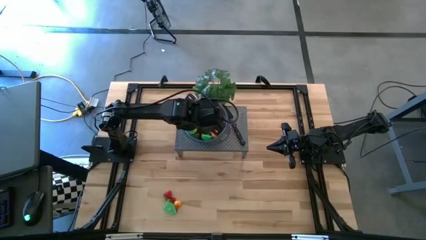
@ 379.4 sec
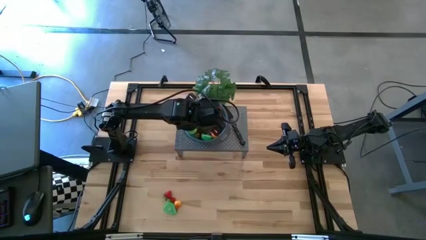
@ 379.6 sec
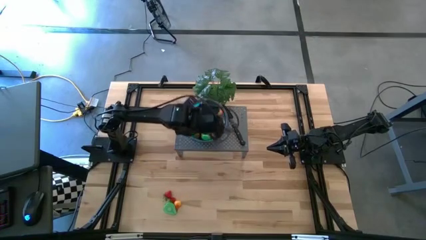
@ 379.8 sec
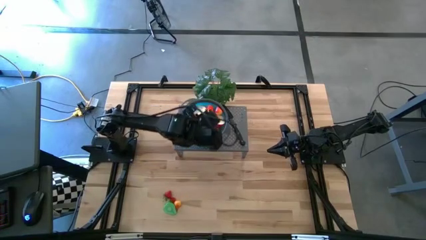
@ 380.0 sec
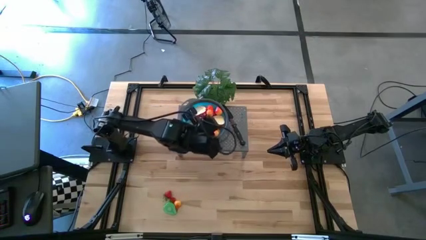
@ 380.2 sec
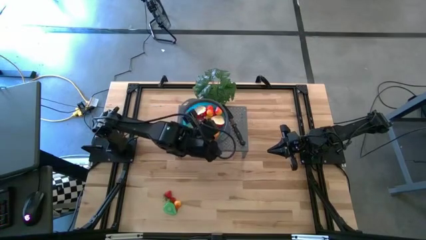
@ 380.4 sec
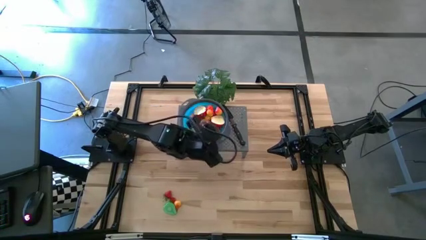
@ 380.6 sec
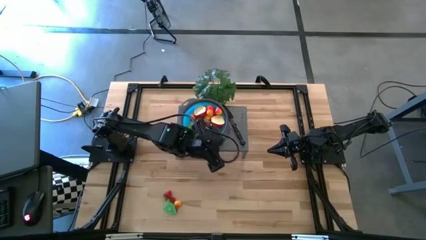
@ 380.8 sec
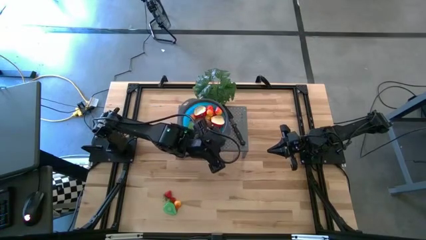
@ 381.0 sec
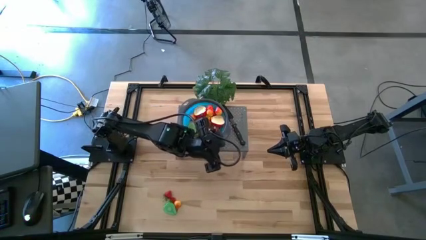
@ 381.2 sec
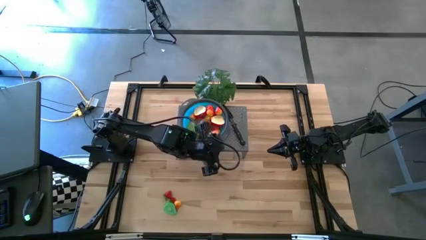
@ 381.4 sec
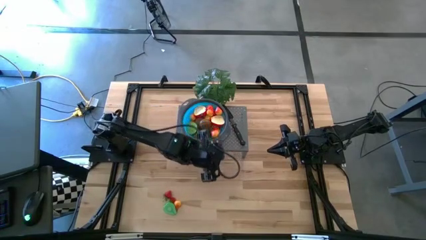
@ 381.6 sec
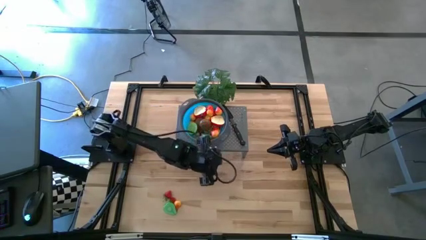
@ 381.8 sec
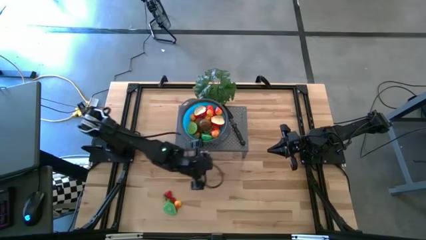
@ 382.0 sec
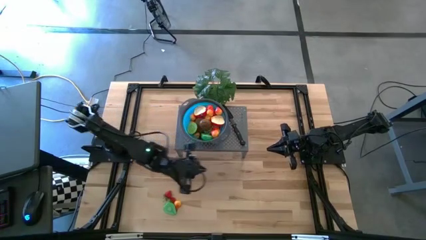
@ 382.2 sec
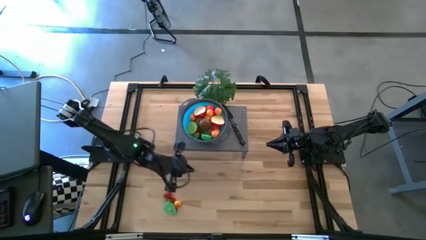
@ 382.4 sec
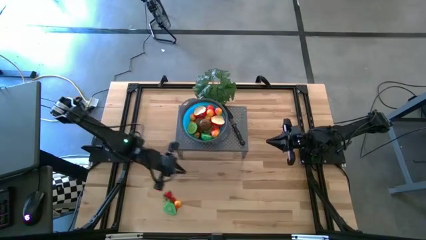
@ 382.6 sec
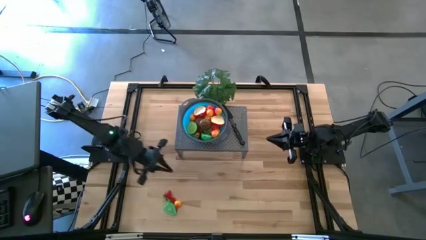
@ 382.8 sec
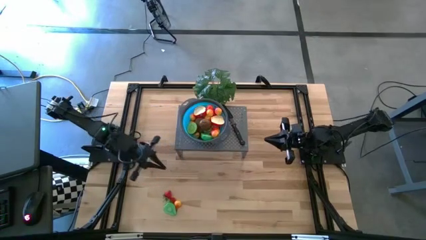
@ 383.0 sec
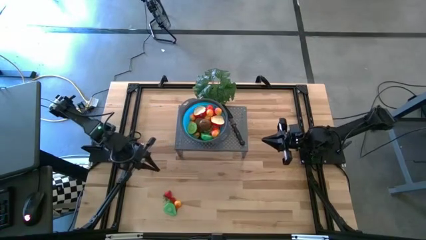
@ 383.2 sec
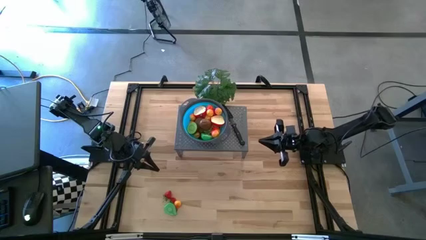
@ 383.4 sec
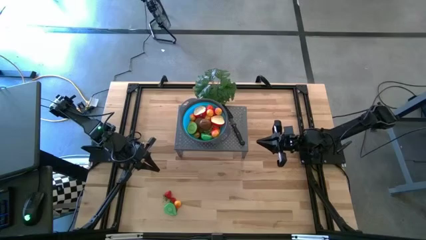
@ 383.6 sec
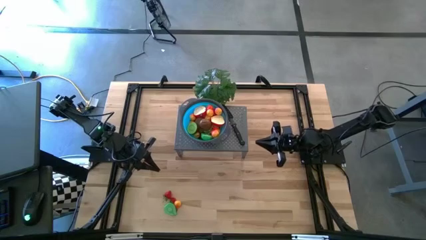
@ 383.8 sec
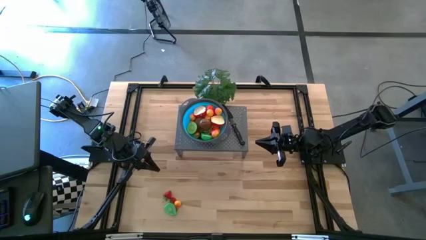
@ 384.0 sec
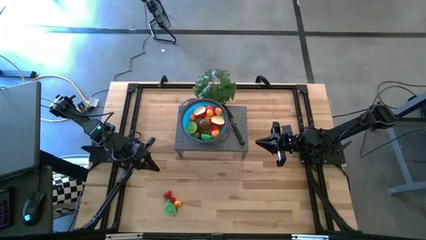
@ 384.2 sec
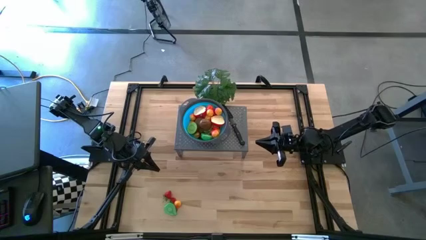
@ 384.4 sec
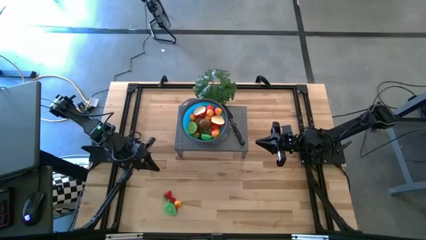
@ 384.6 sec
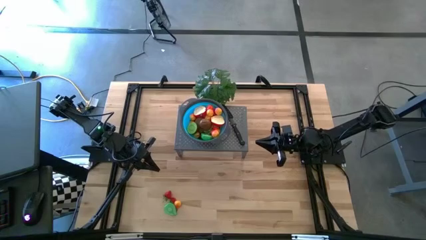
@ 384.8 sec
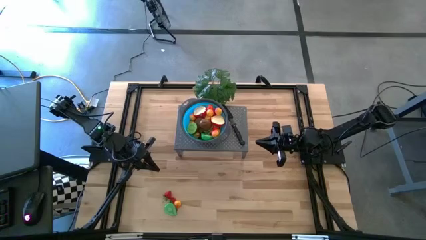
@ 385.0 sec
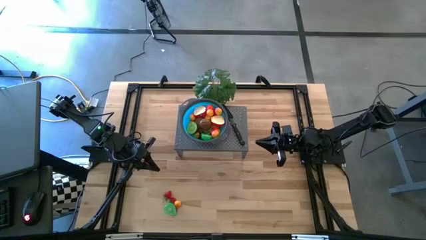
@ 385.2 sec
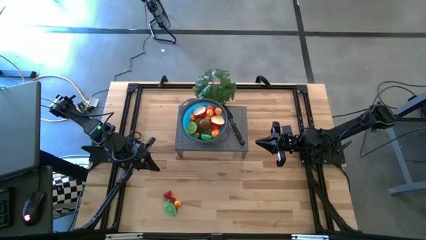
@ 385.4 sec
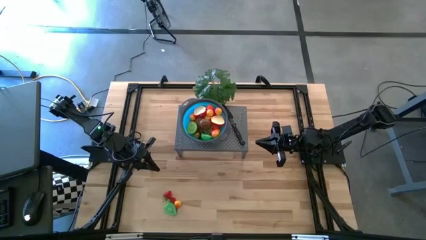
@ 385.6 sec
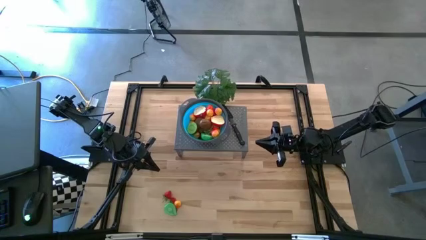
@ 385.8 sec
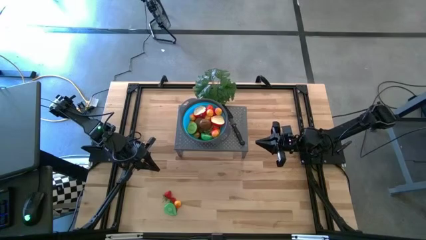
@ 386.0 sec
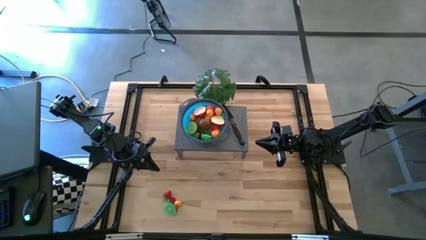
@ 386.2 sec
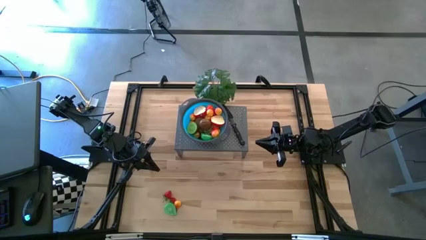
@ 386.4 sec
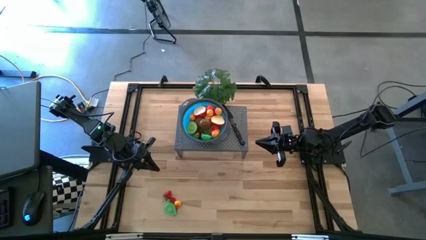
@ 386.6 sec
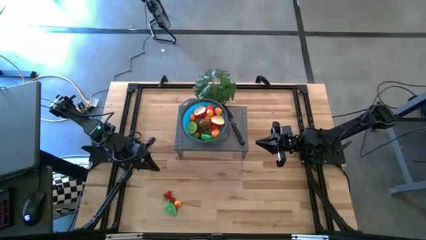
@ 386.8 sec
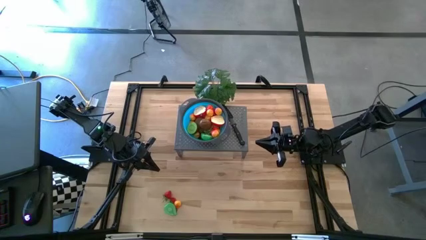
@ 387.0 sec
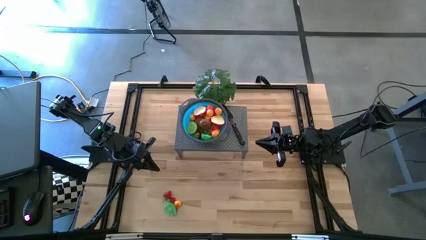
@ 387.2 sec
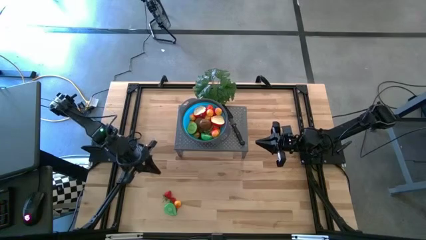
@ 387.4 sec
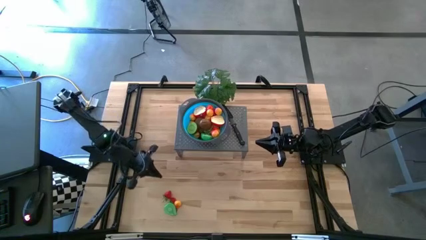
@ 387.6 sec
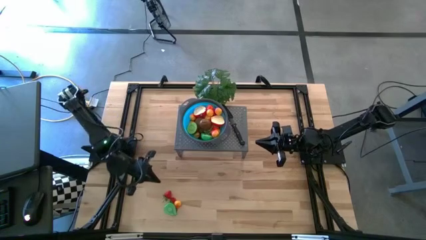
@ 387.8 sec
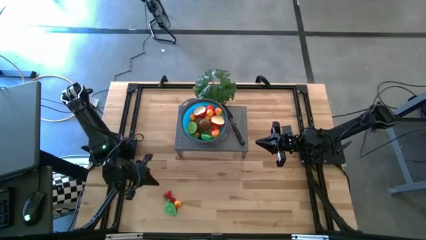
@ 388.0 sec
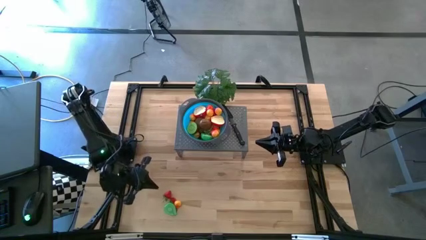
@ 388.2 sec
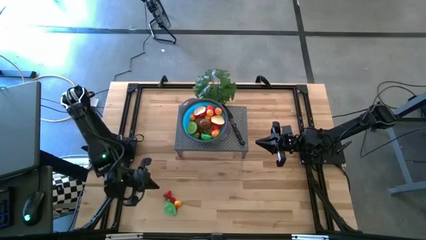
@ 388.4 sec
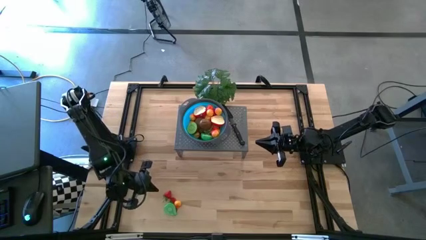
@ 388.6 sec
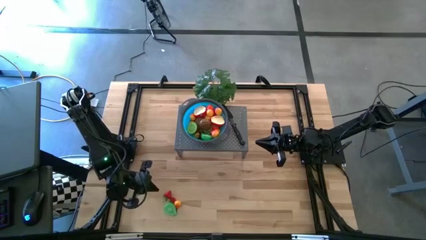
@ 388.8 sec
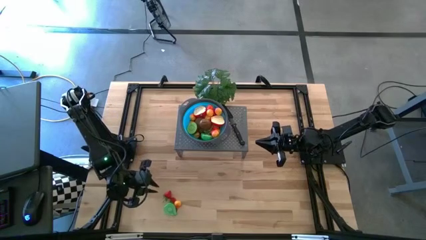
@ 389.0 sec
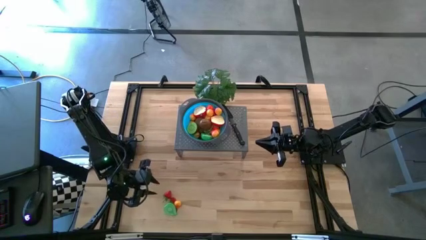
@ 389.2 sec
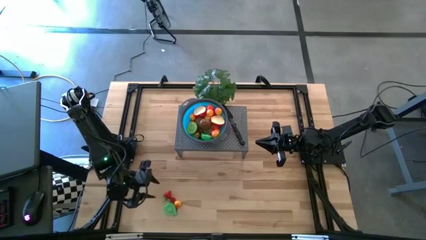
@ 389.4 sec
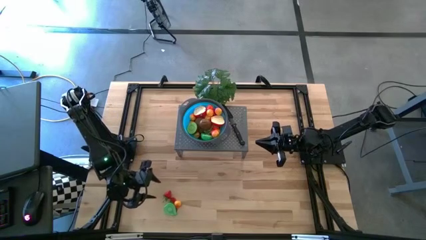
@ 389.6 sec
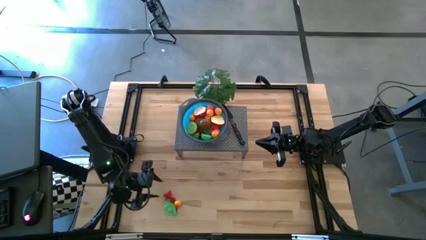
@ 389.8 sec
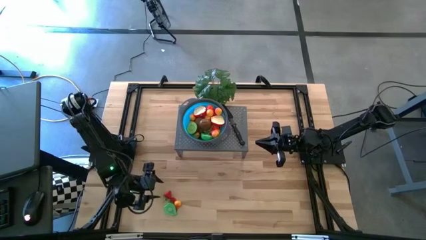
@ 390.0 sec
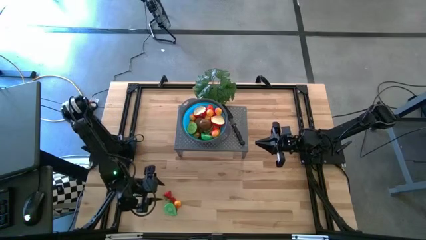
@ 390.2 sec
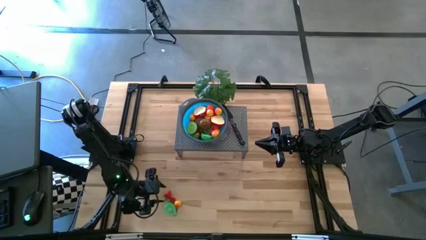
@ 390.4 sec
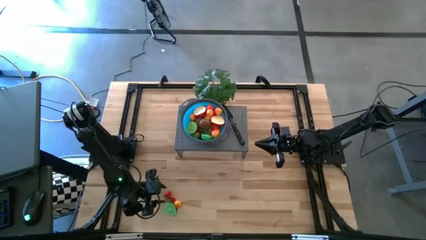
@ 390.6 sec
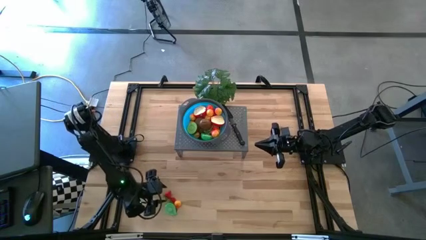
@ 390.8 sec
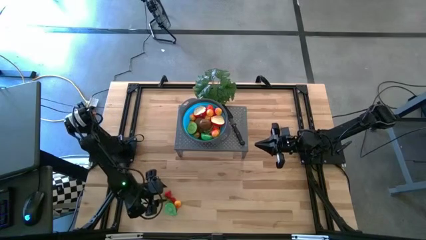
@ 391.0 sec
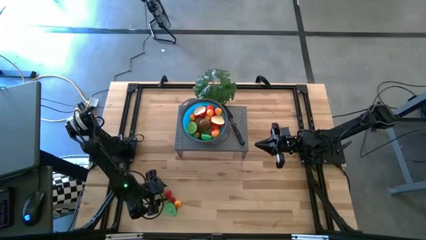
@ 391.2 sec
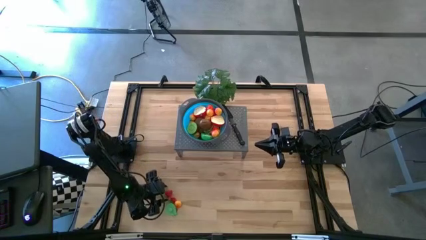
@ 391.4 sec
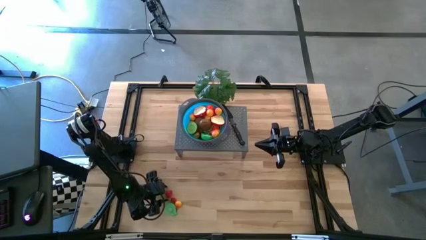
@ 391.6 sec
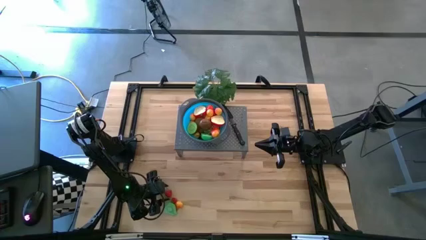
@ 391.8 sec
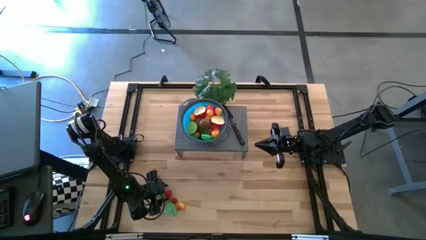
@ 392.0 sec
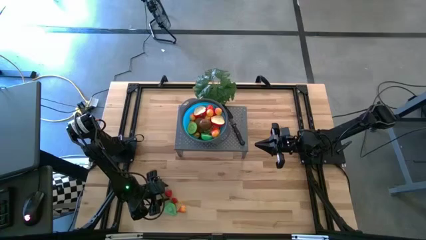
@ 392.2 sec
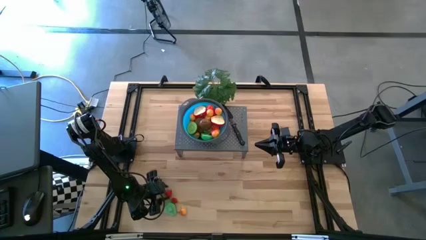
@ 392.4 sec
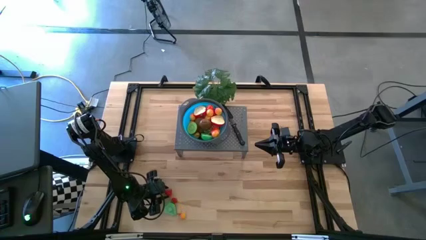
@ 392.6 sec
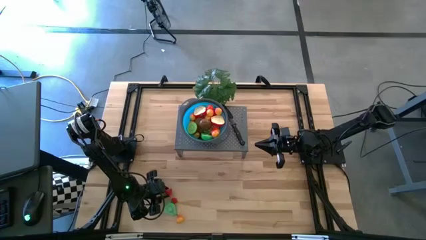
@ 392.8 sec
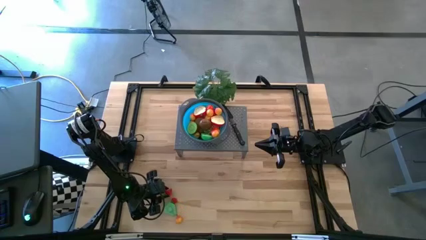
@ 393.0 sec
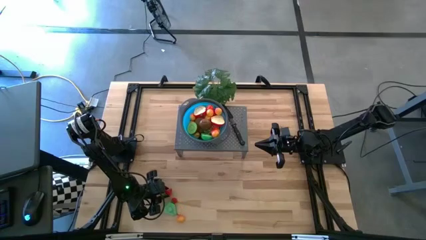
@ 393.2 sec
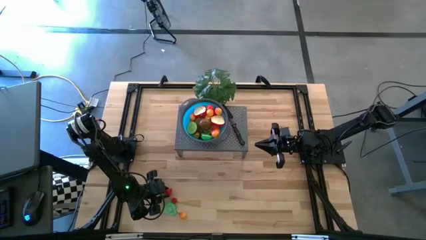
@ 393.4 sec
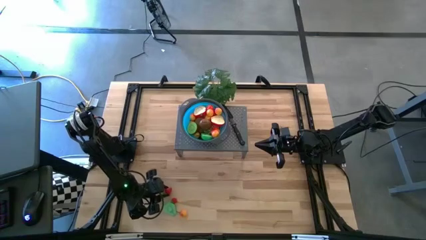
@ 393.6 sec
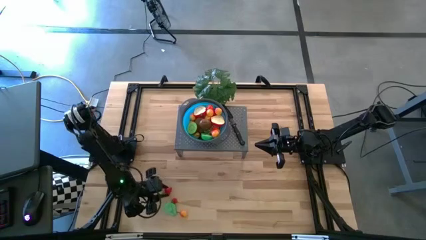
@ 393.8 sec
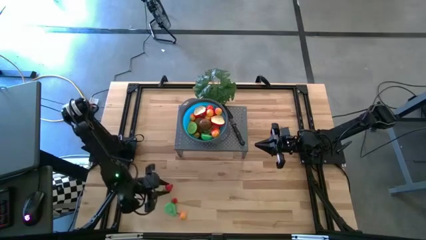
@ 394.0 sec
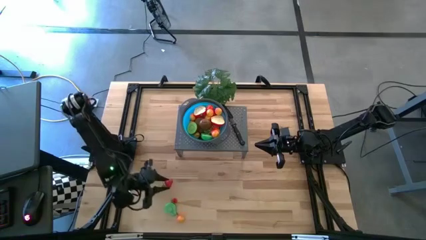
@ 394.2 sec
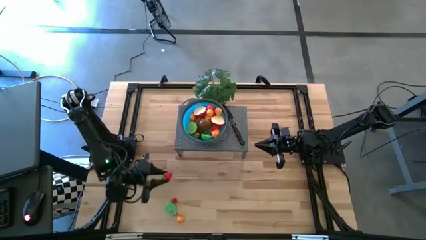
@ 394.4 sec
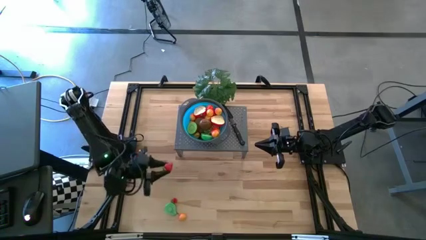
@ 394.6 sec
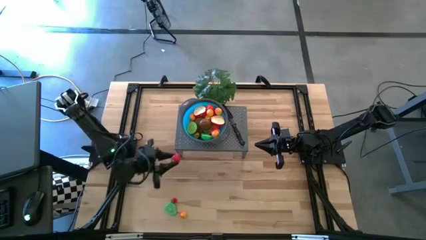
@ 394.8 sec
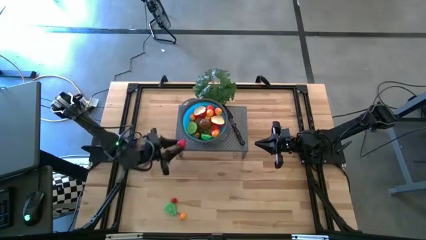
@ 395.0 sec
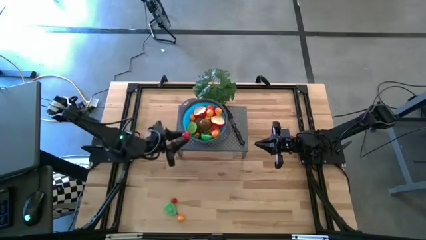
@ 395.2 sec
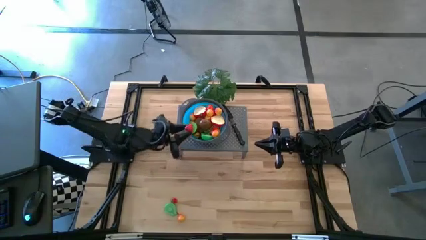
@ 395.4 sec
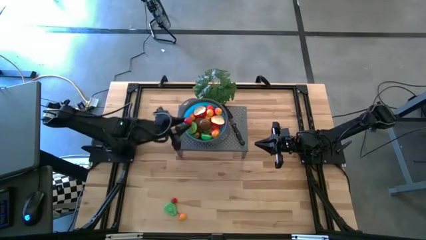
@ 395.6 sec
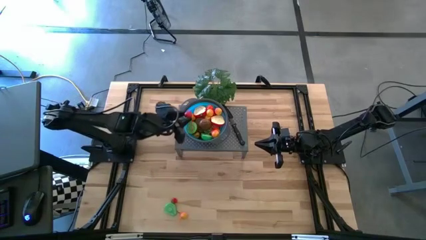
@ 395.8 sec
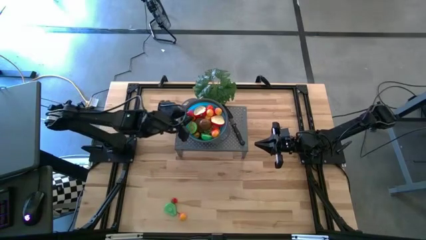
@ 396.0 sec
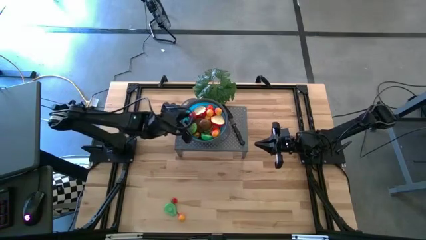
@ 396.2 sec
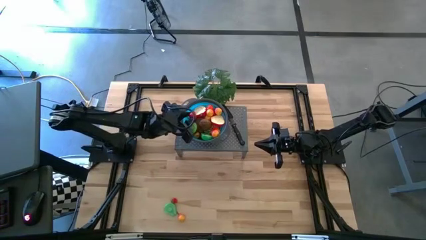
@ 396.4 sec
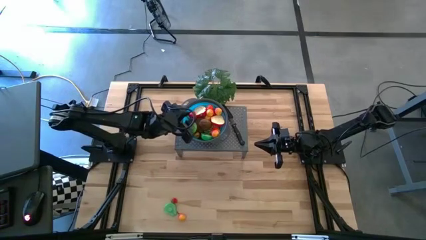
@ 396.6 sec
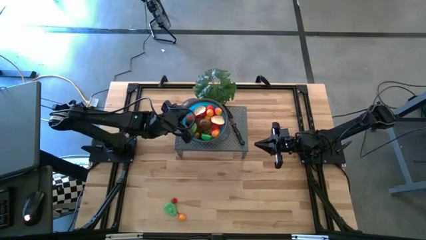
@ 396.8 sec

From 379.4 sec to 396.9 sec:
Task: Pick & Place Fruit
Put the strawberry into the blue strainer bowl on the shelf
